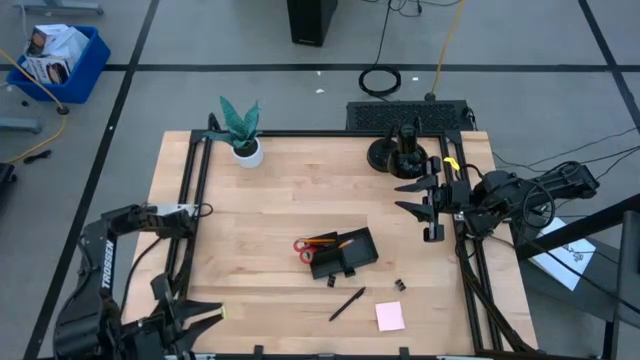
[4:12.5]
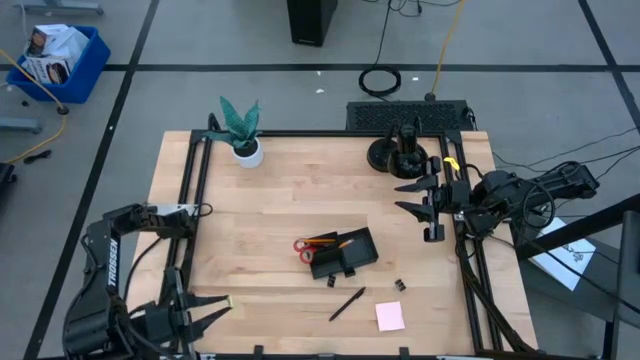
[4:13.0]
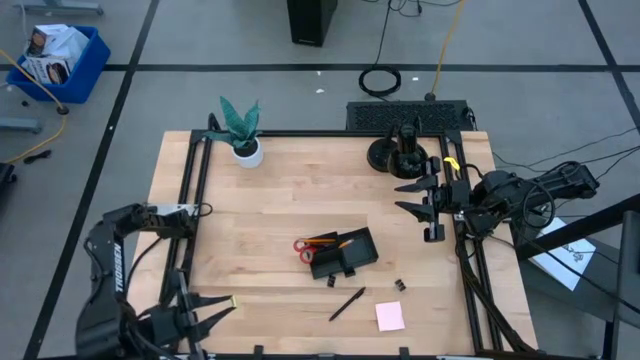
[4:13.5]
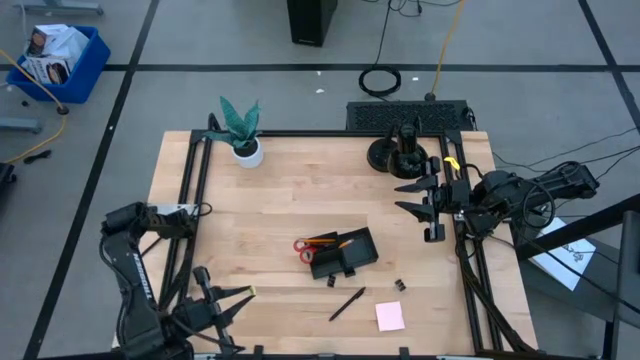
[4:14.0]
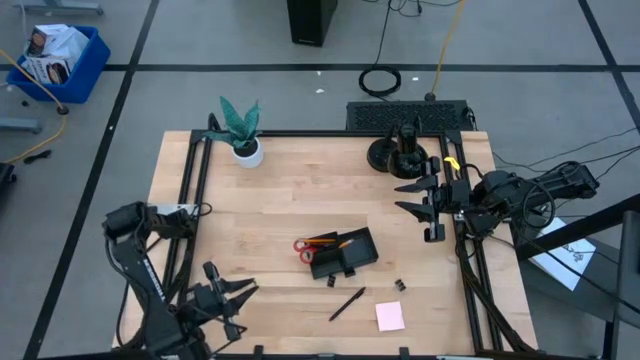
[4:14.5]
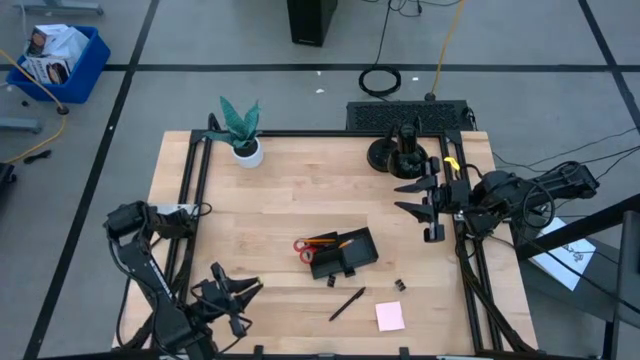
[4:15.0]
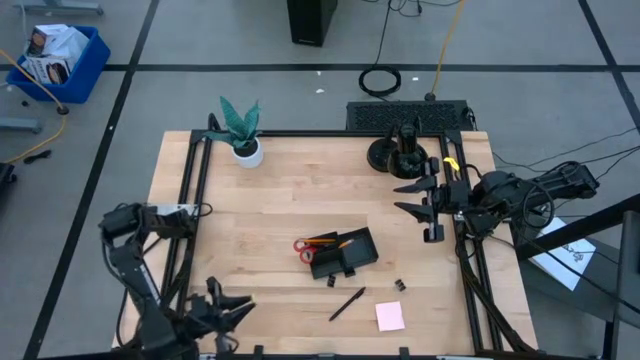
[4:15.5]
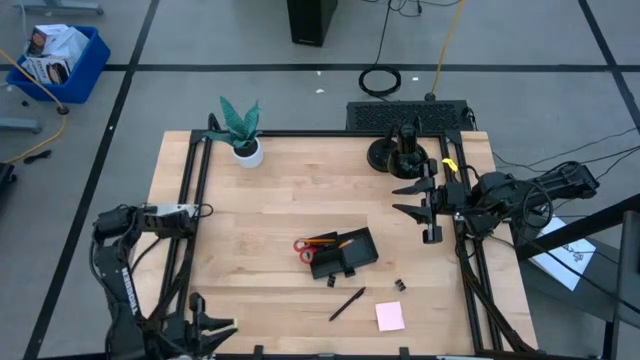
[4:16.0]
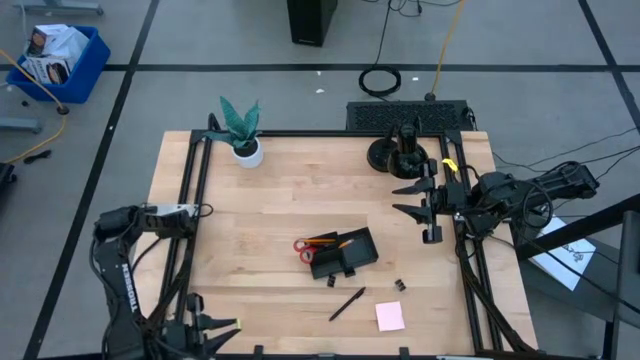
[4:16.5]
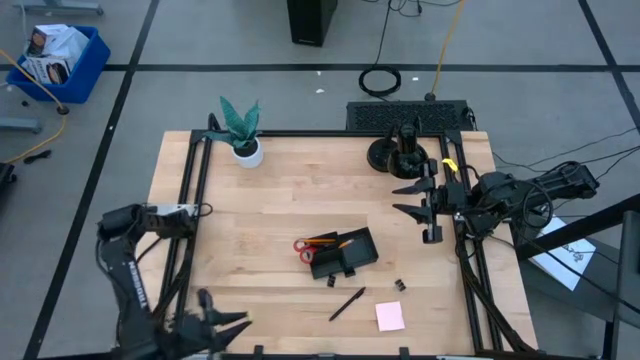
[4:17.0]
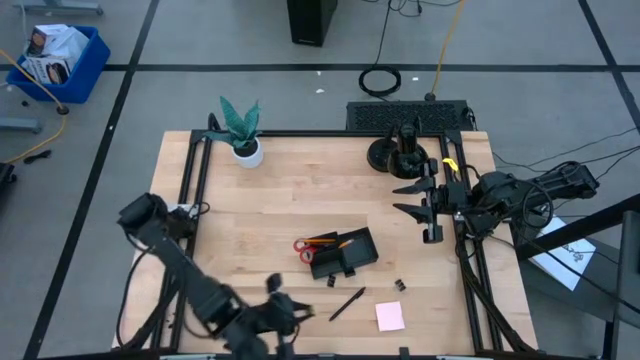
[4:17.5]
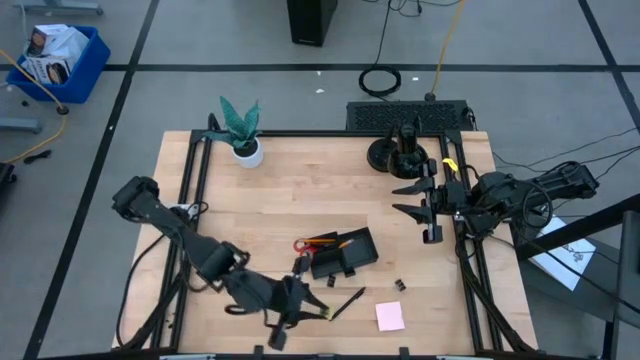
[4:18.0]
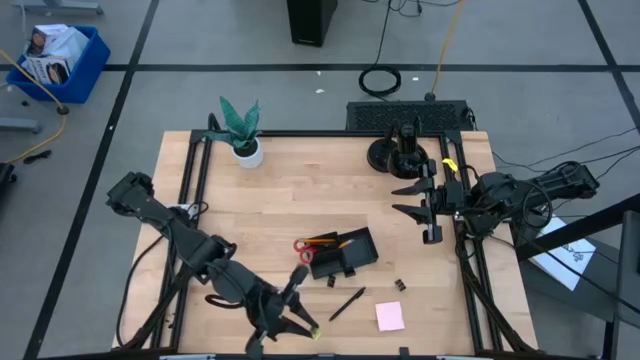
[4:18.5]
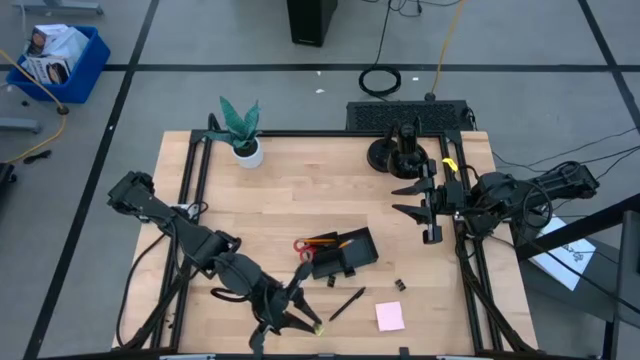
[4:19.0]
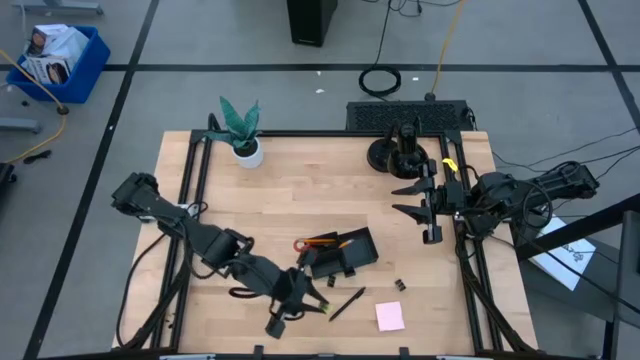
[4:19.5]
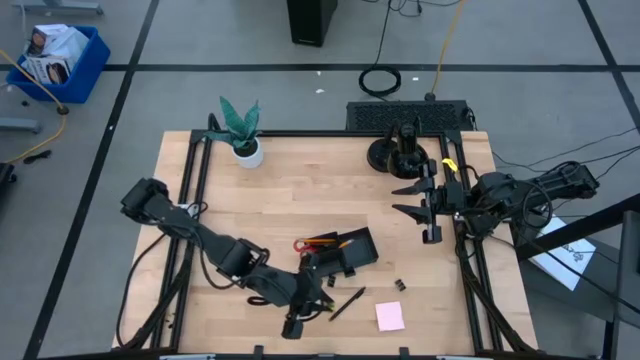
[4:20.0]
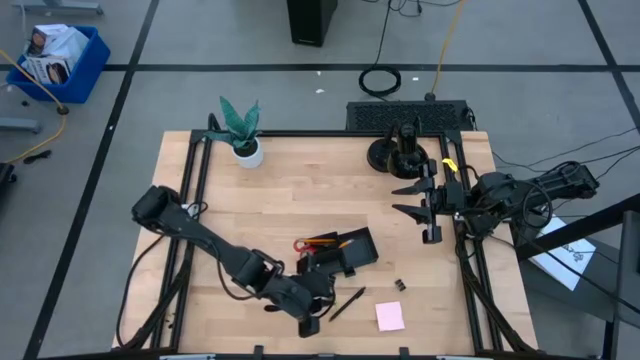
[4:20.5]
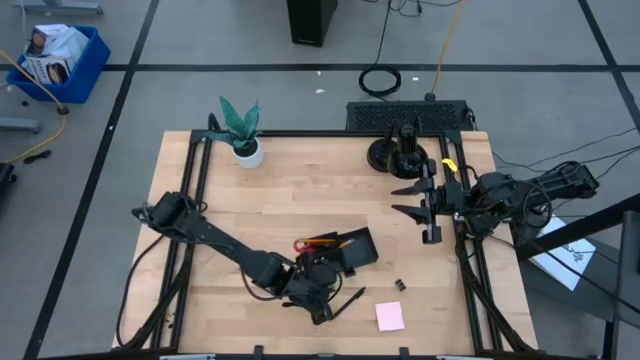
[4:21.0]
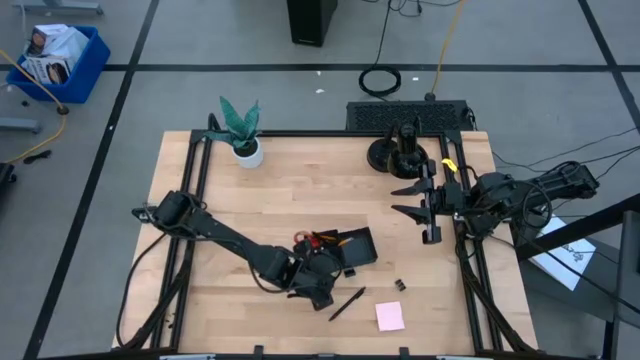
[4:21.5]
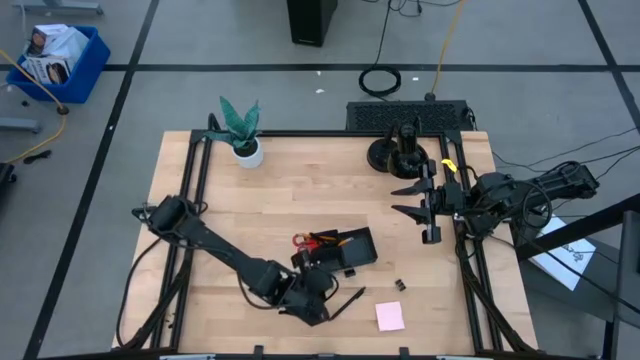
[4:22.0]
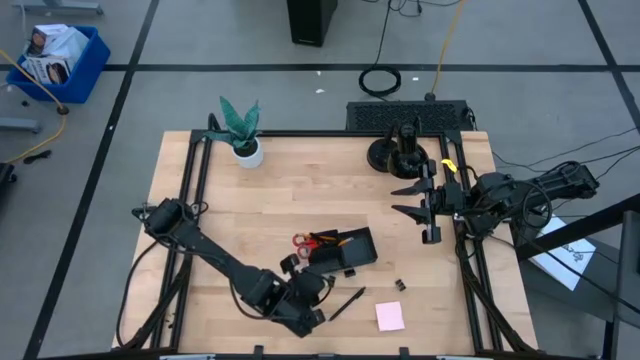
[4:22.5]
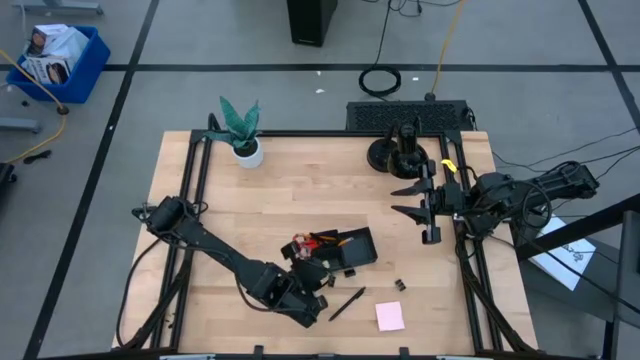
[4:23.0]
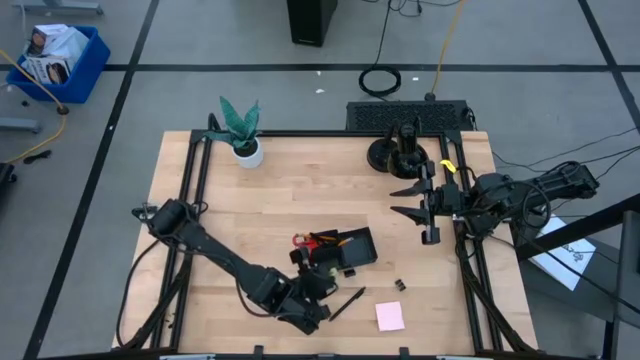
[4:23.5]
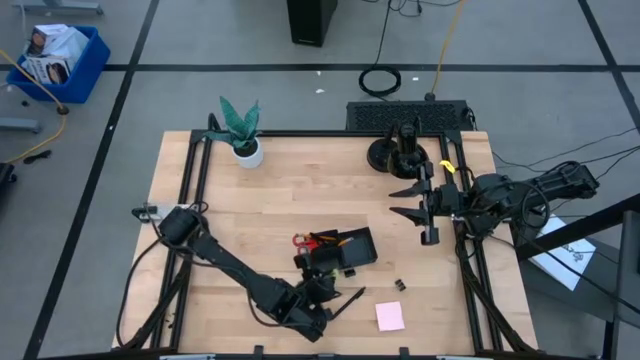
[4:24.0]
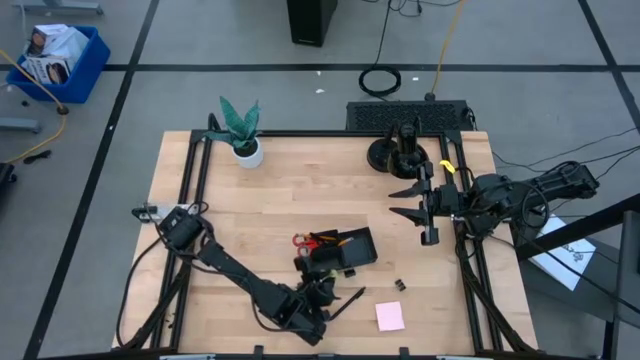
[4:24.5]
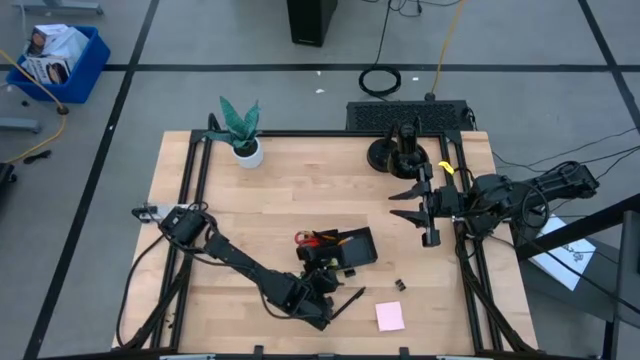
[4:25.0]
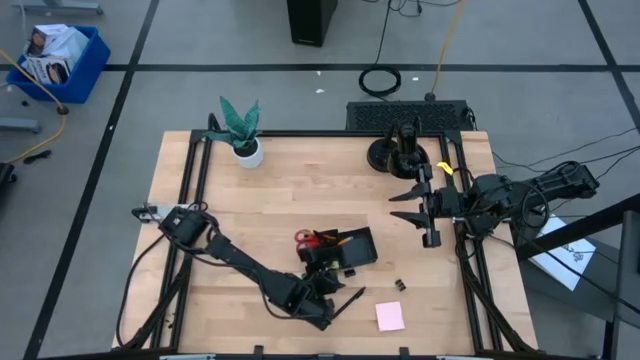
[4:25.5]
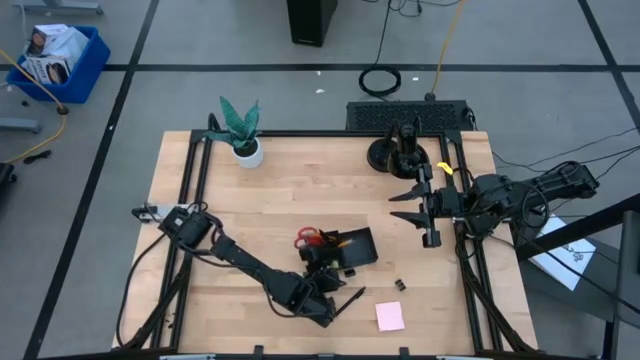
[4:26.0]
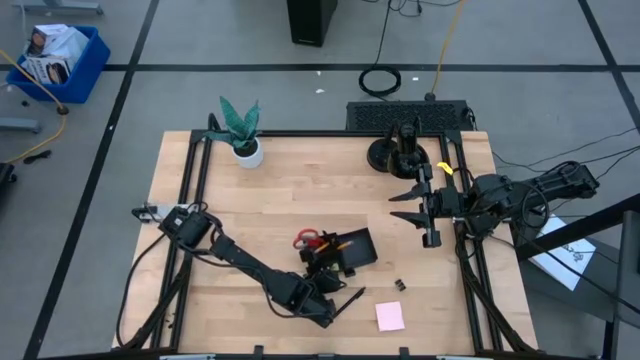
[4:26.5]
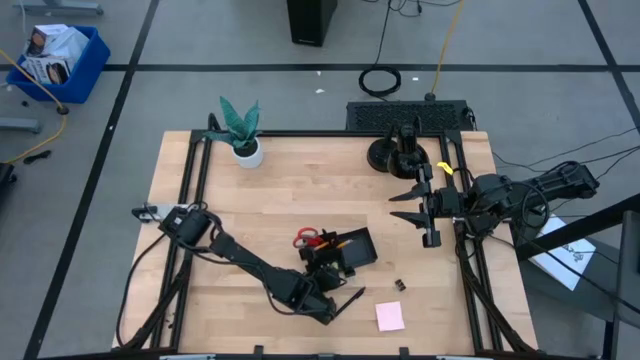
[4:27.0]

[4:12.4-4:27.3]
Task: Pick and place office supplies into organizer
Put the green eraser into the black desk organizer

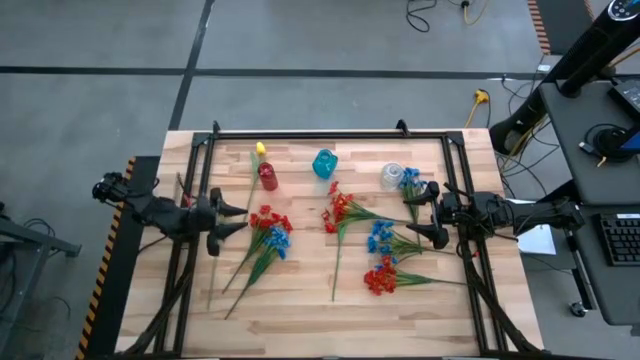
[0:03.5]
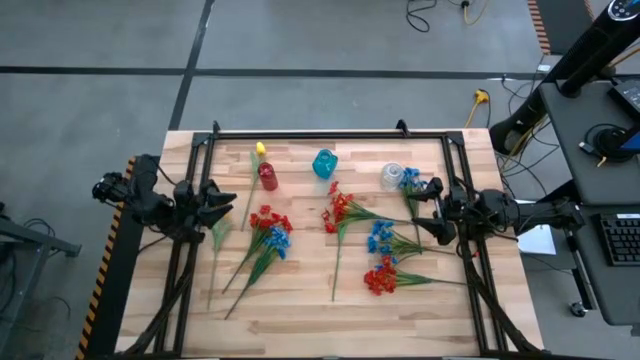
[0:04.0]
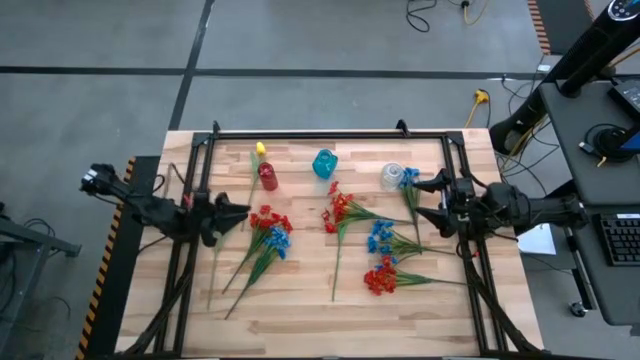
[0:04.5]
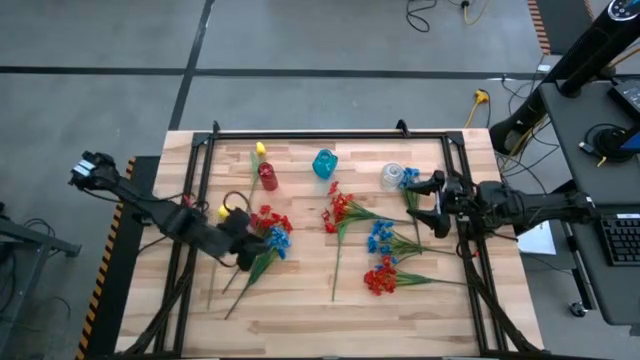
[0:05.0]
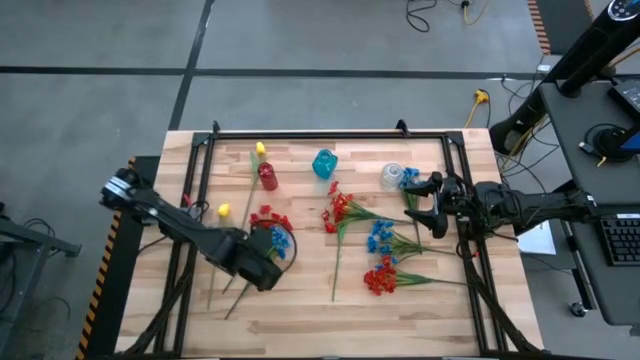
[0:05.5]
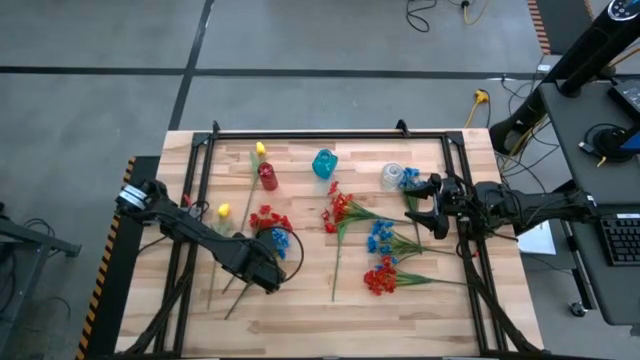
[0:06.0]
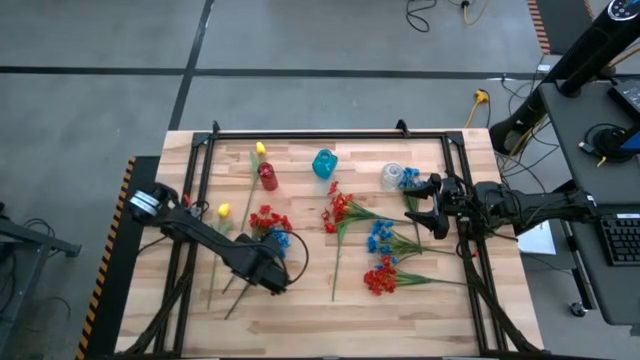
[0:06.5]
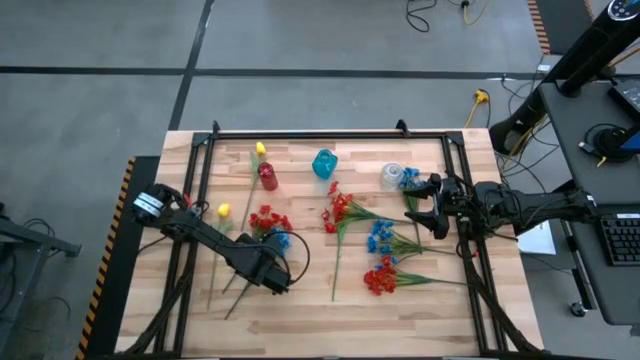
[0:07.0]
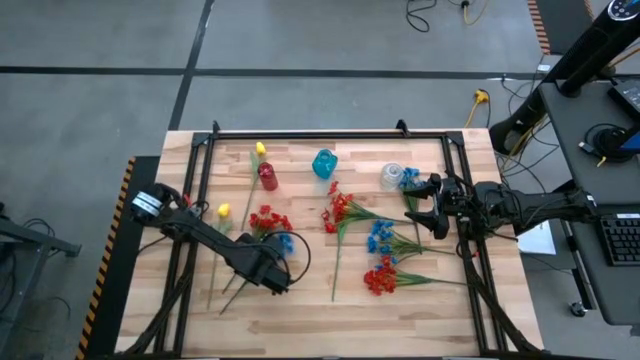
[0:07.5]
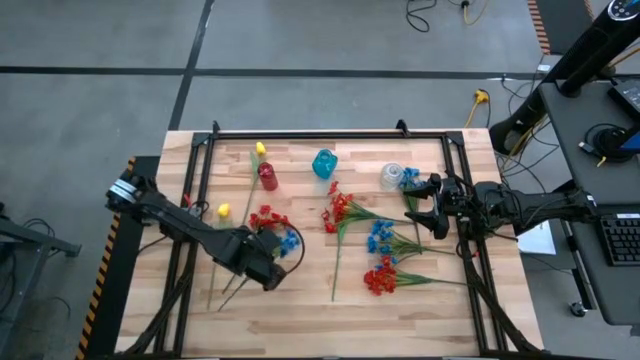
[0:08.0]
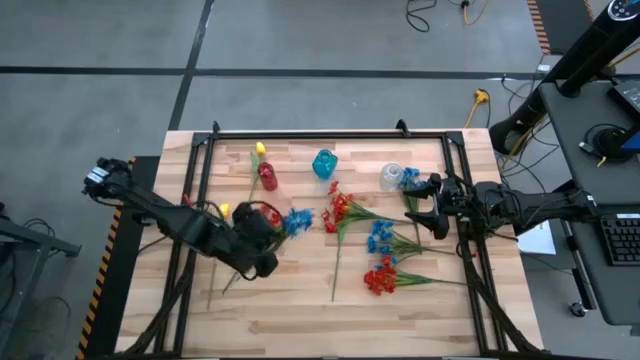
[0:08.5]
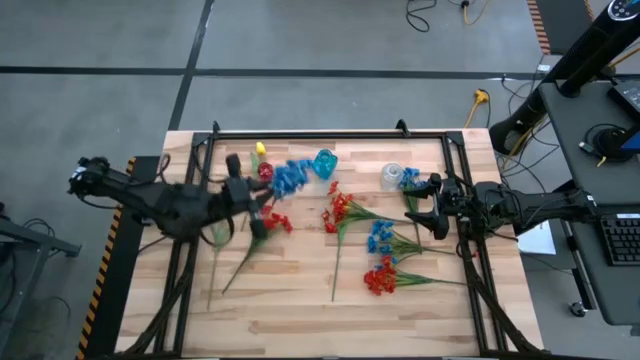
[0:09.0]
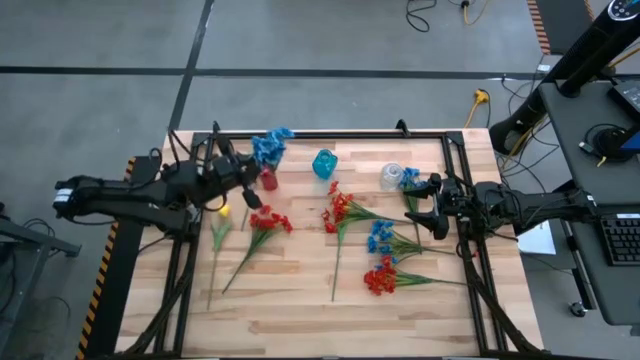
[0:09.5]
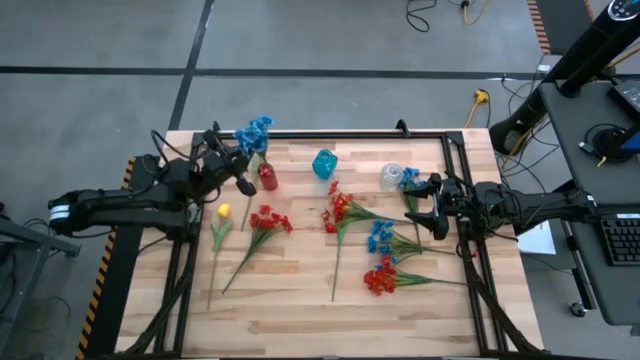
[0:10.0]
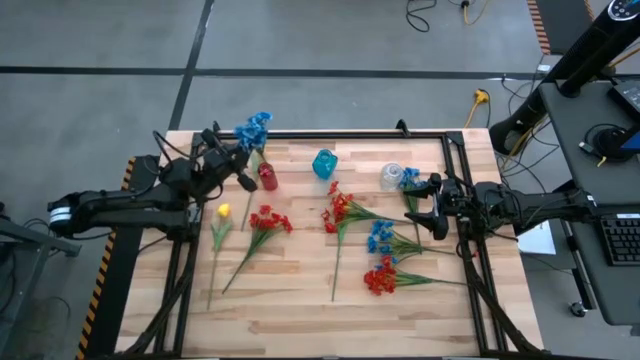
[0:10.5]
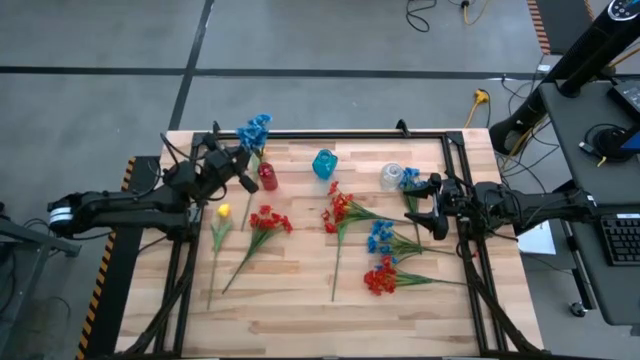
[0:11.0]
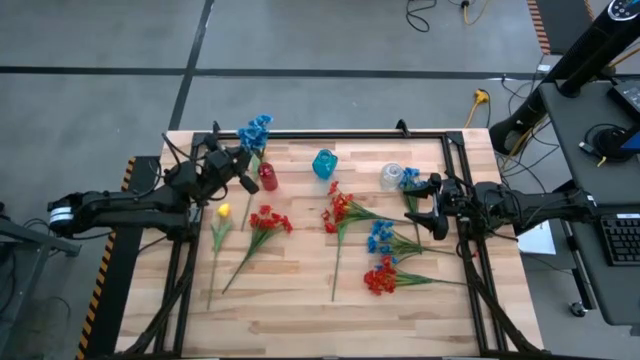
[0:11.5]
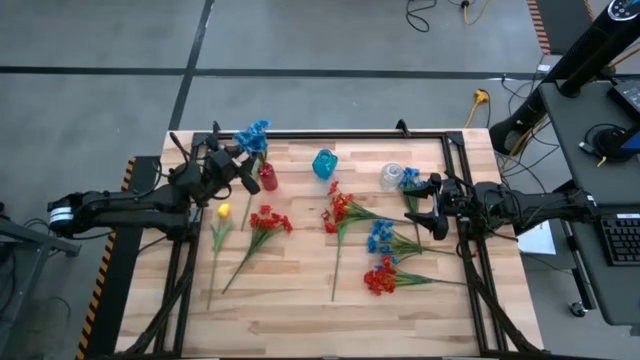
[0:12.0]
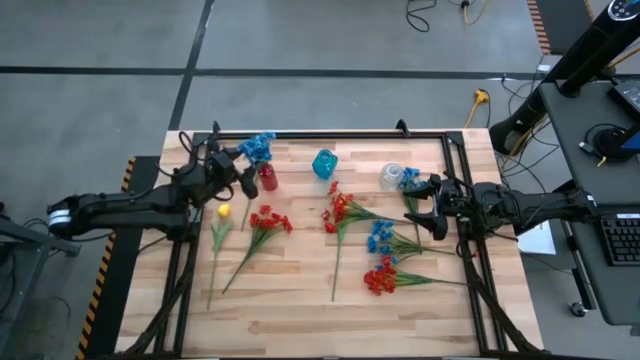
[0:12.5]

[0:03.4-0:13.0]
Task: Sort flowers into vase by color
Put the bottom left blue flower into the red vase
